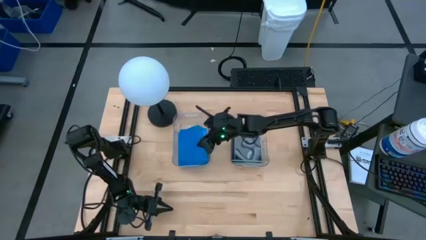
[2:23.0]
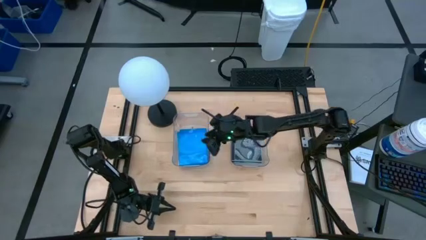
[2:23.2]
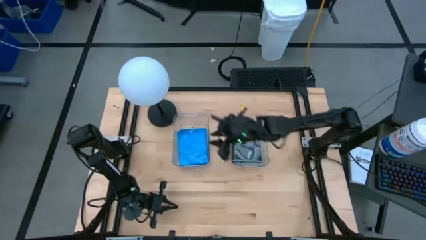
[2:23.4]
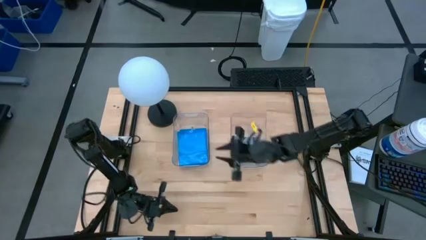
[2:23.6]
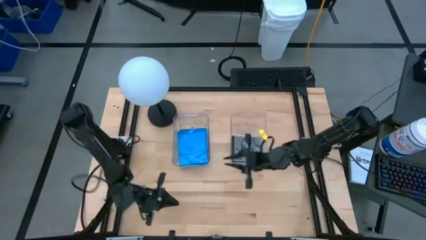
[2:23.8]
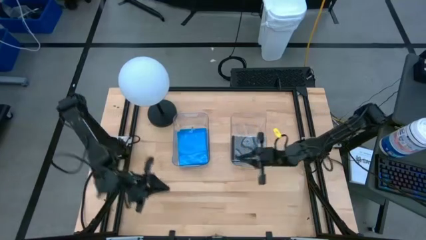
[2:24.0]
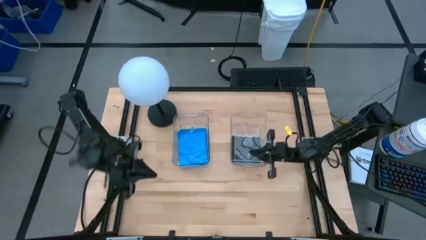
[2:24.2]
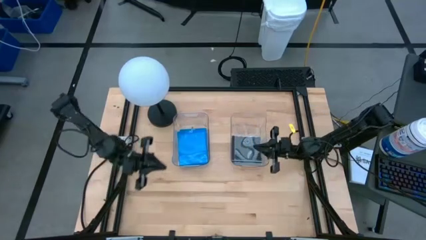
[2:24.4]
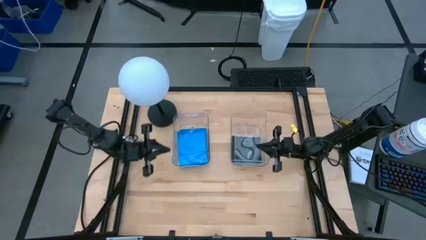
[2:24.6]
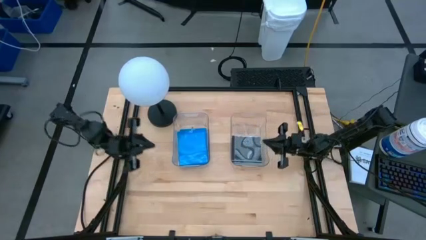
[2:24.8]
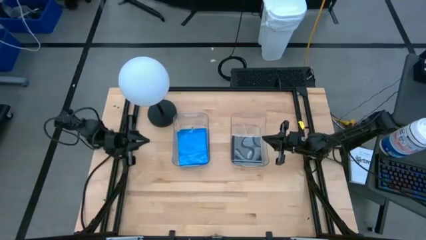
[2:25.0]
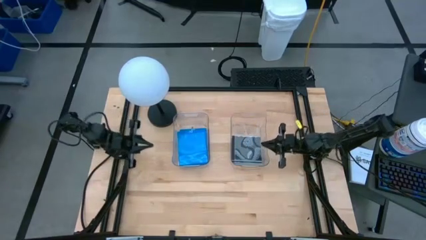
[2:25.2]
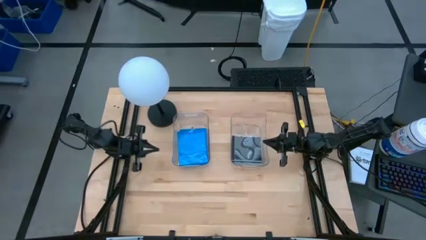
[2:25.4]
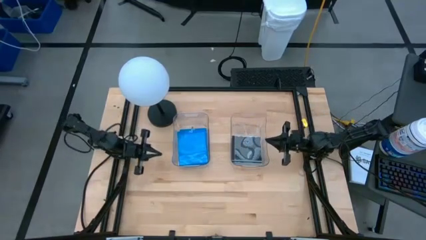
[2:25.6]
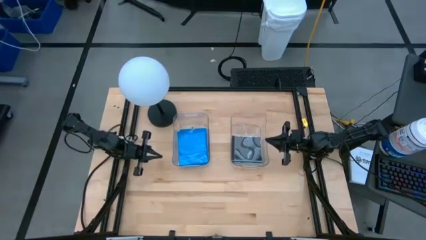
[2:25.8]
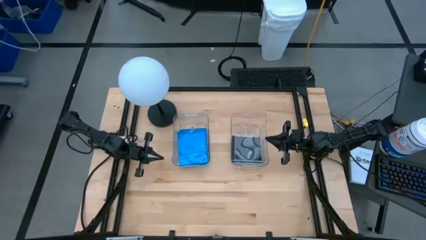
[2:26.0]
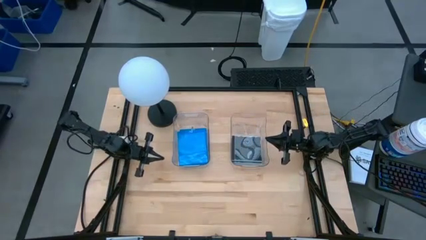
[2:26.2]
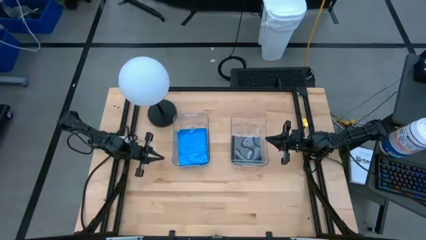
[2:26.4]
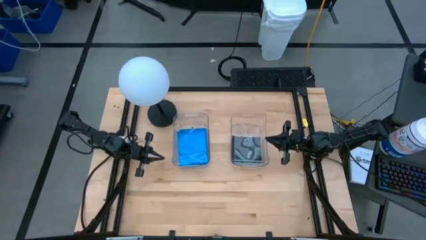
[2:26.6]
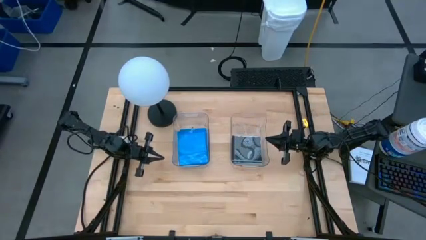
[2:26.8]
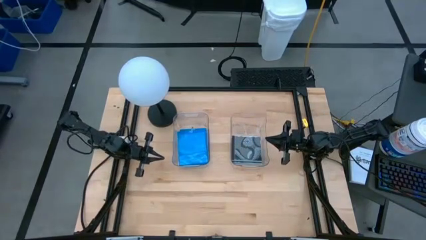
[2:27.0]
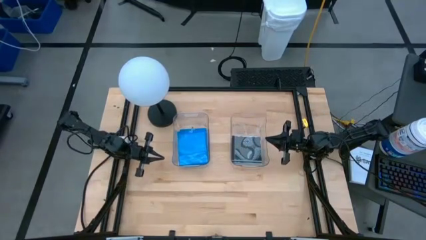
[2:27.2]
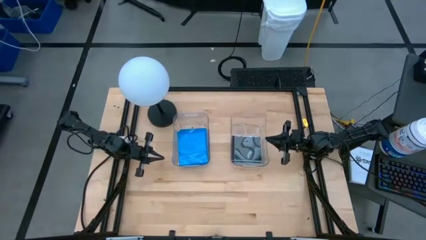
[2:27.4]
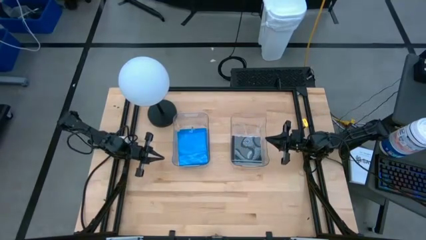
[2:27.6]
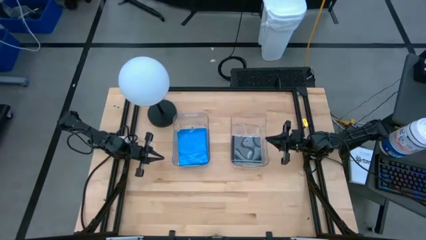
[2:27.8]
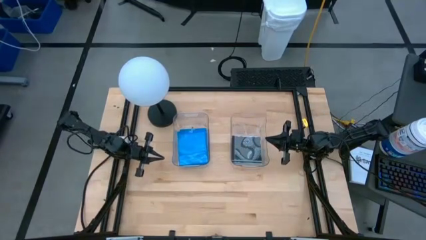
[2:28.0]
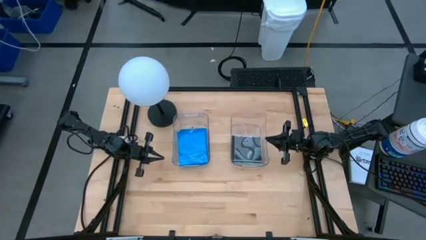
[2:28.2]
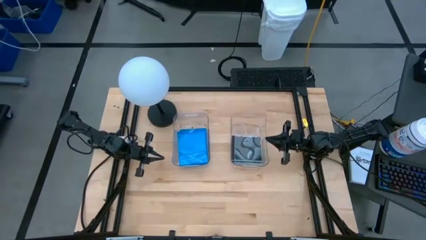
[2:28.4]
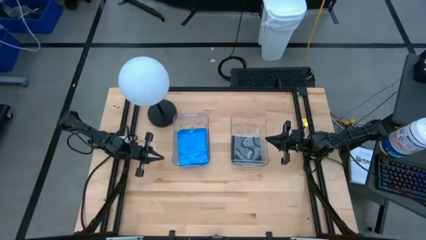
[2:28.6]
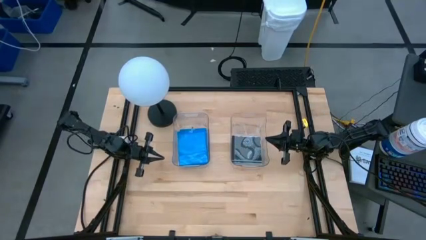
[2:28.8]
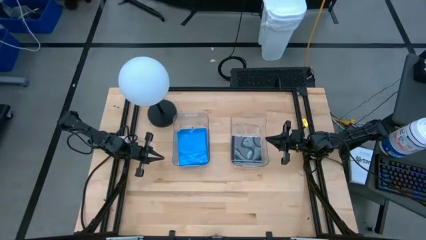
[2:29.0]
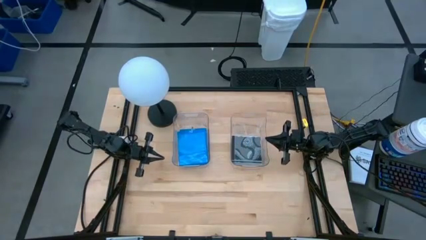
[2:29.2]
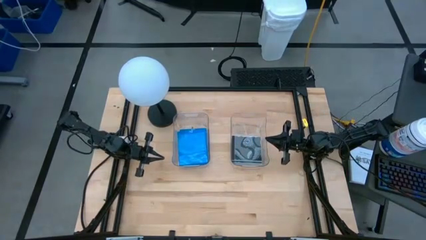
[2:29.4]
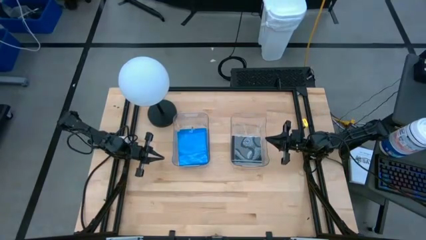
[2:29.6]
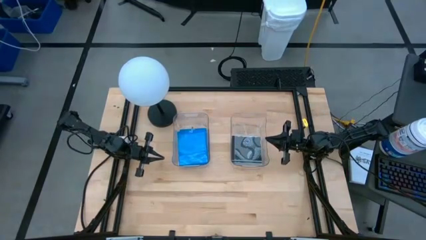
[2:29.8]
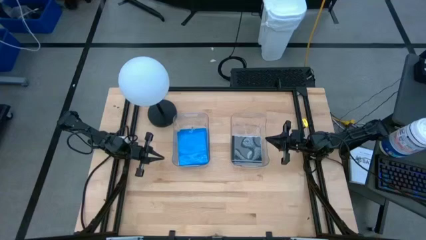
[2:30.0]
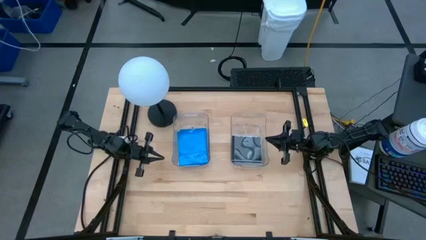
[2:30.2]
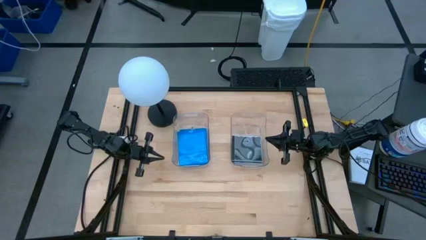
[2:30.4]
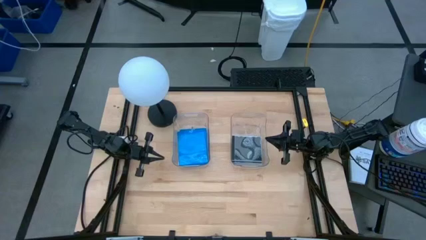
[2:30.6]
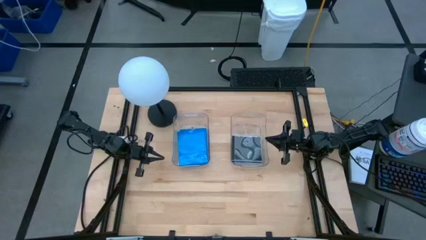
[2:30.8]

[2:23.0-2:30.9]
Task: Pick & place jewel cases by type
Return to Home Position

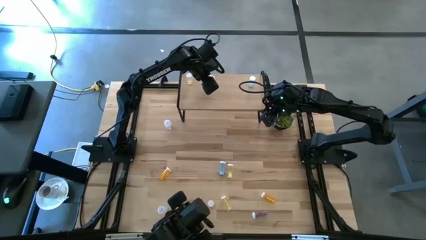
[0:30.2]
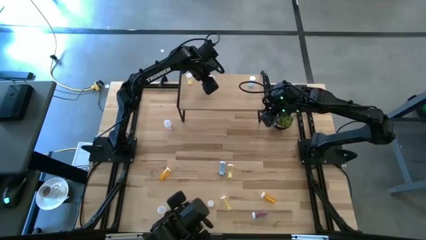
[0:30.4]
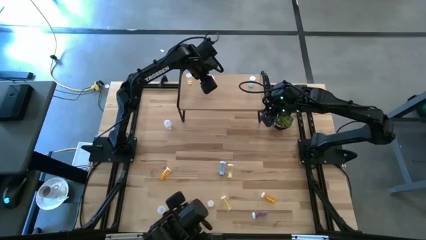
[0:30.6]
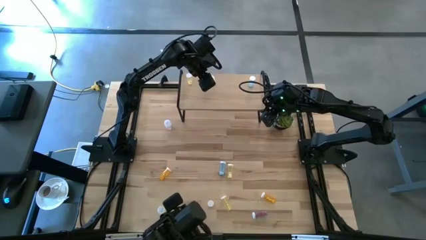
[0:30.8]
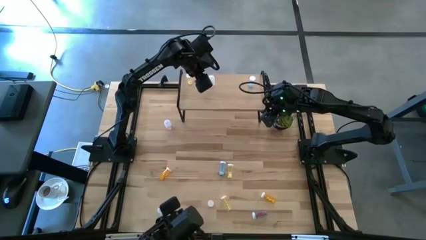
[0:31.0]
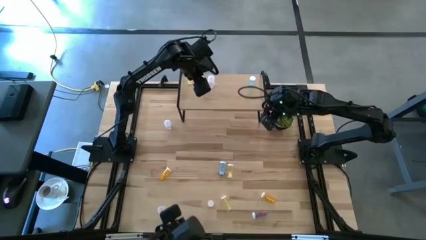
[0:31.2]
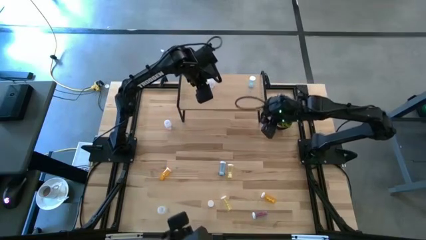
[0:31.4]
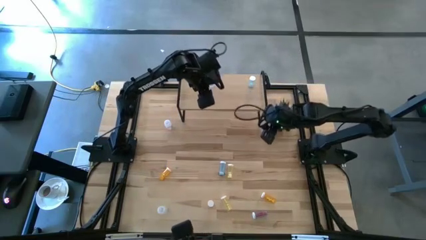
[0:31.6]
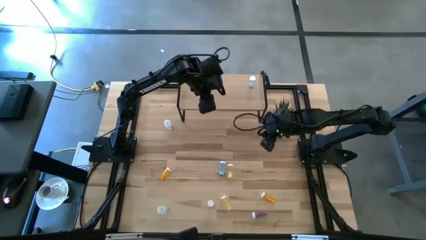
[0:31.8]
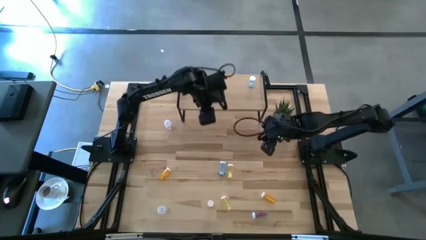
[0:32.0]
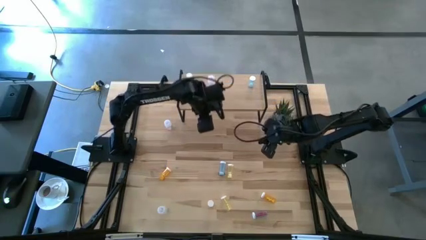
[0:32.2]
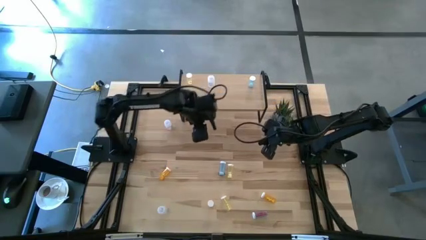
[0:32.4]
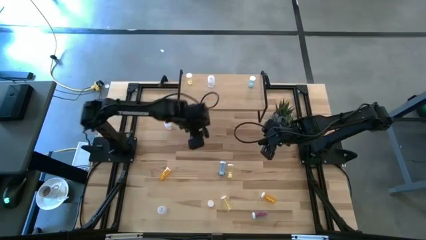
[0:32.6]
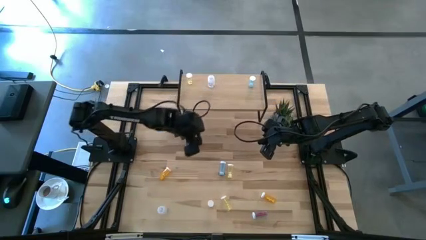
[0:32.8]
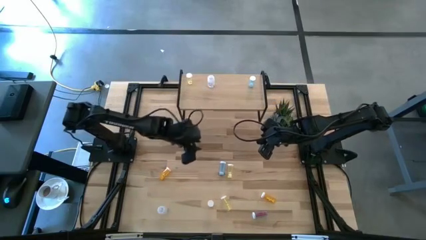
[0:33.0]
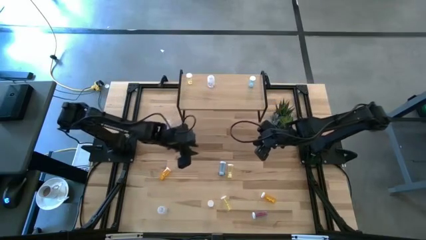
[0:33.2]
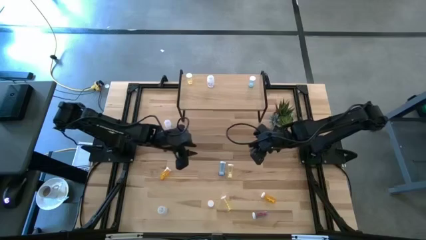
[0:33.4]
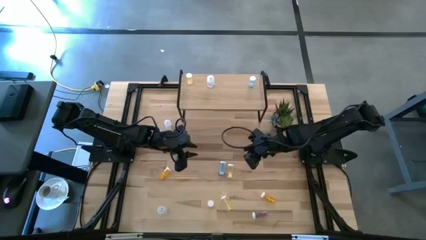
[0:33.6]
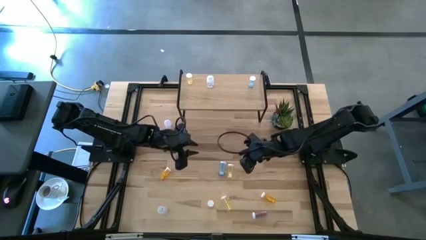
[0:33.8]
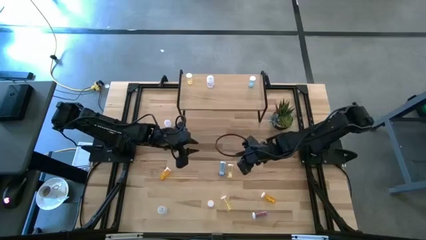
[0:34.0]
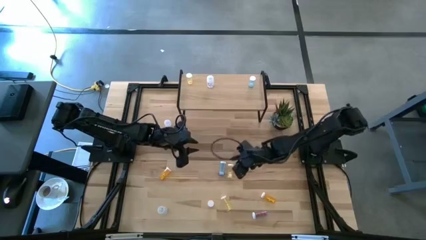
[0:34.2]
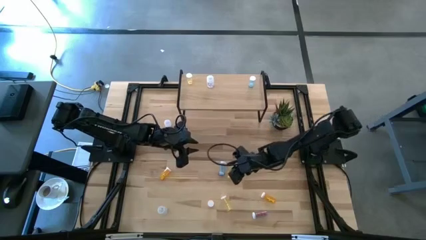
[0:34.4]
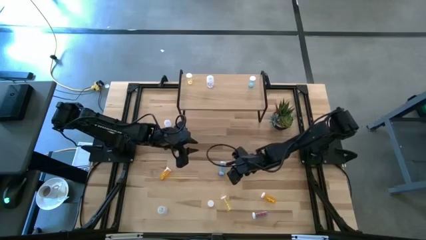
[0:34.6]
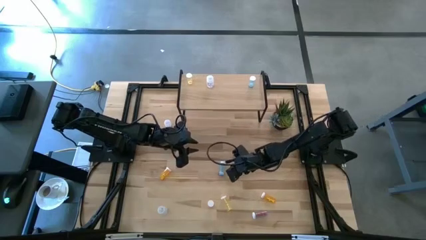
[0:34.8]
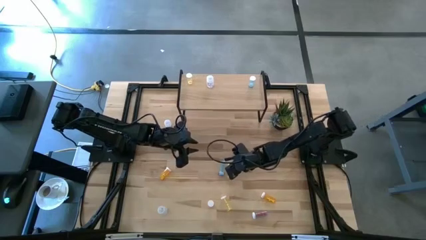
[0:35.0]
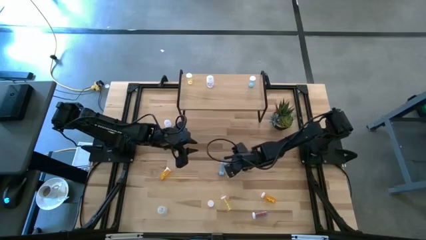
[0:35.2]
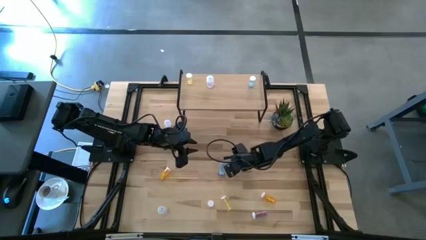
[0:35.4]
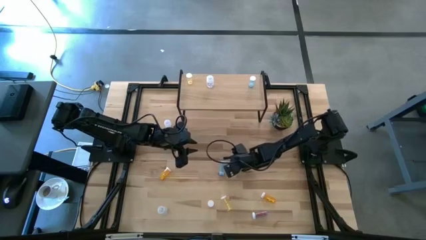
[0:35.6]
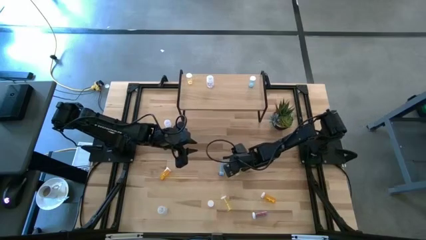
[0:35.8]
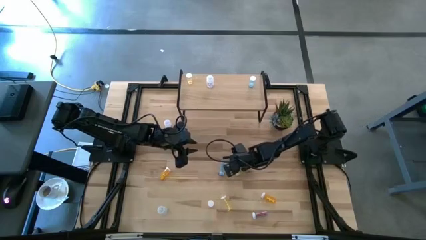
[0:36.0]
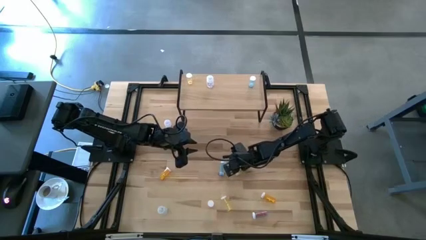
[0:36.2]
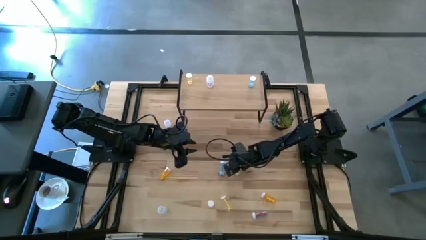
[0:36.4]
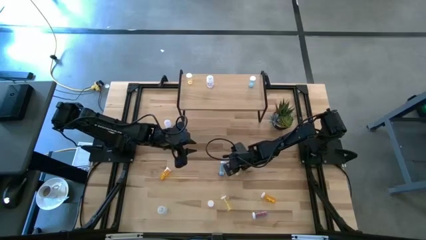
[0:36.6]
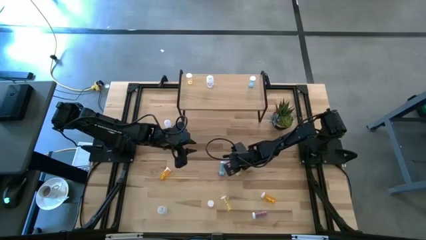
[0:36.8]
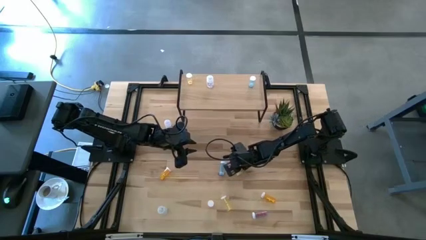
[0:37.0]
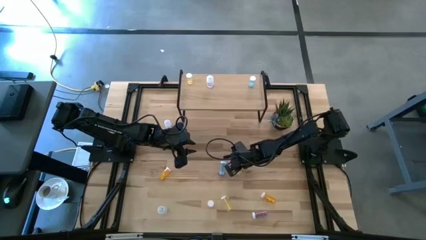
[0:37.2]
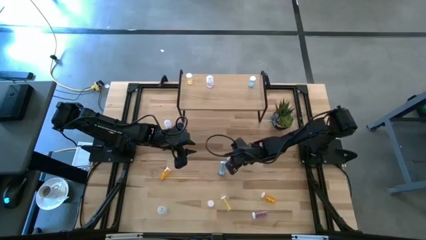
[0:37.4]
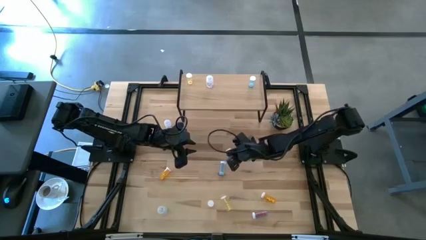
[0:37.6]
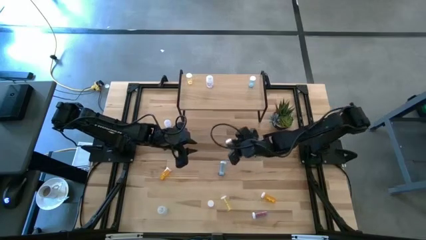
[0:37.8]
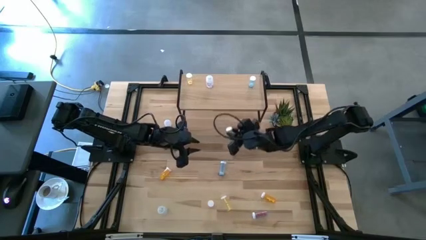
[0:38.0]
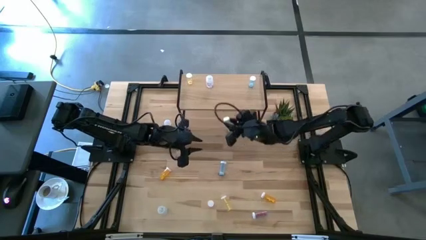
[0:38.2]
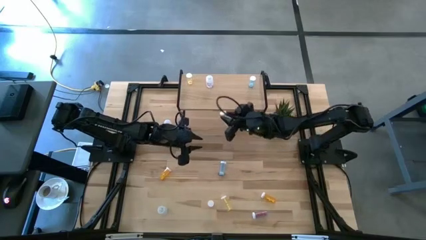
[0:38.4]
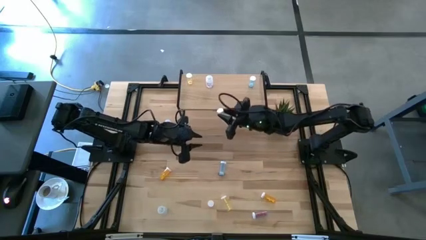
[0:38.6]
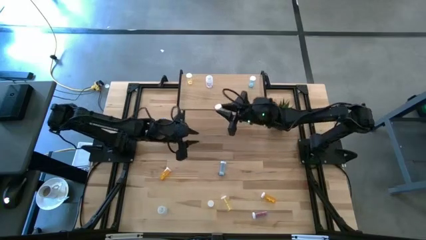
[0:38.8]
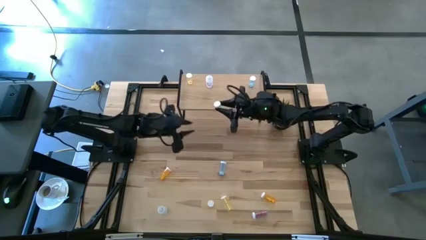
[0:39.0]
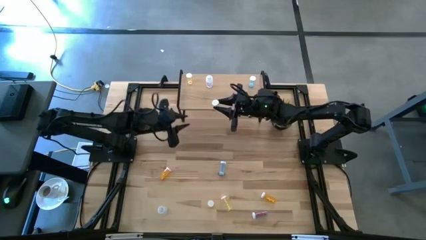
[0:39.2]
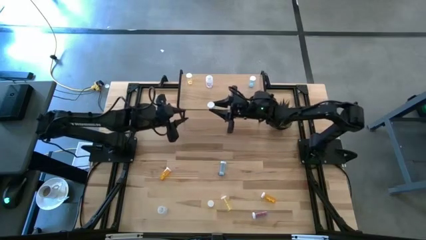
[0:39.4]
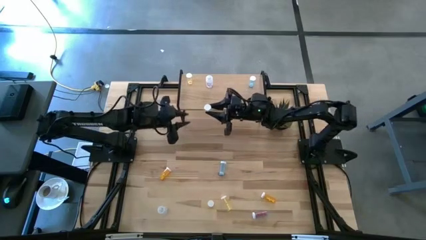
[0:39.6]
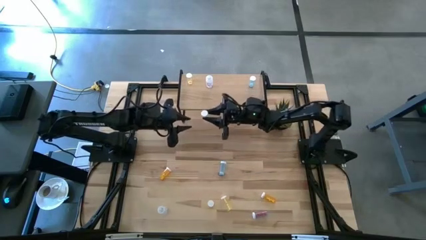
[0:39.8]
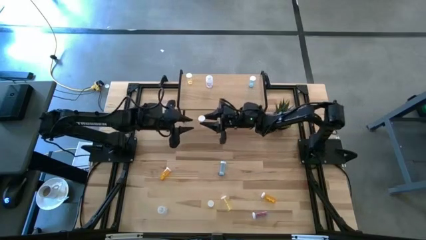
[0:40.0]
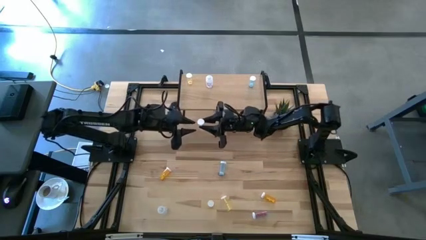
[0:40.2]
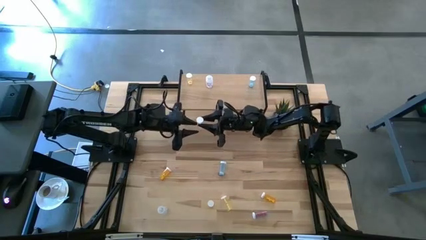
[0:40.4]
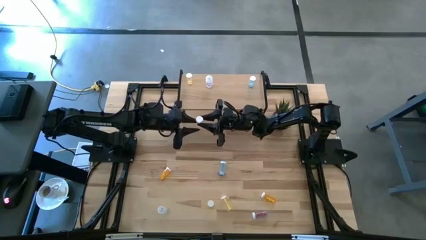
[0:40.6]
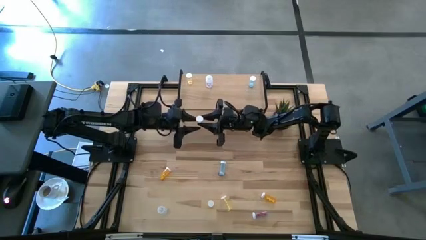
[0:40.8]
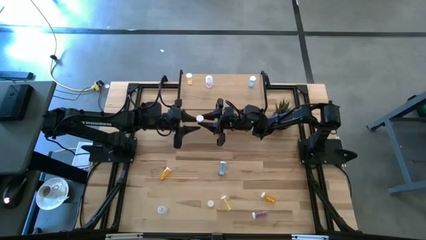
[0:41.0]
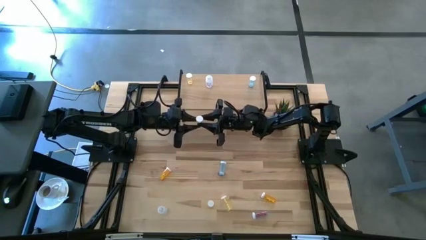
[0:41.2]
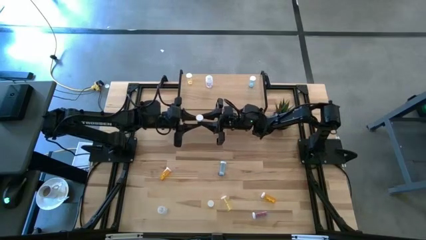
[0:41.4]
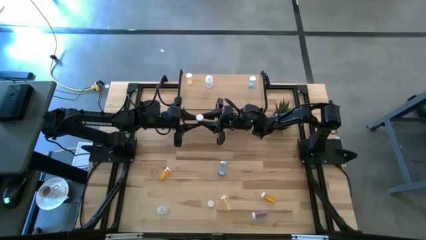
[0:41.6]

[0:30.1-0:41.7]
Task: Pick and place medicine bottles onto shelf by color
Put the top yellow pill bottle on the shelf aligned with the other yellow pill bottle
